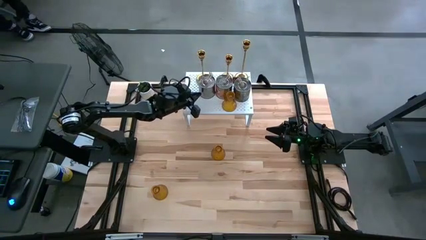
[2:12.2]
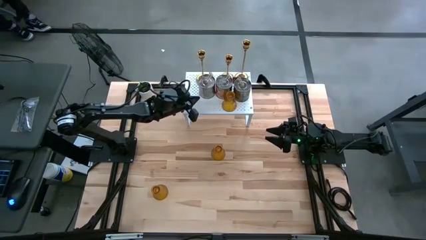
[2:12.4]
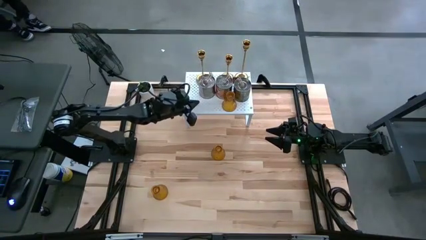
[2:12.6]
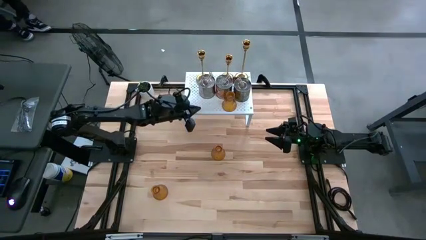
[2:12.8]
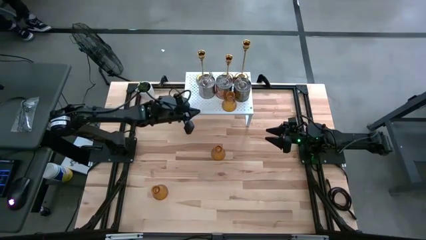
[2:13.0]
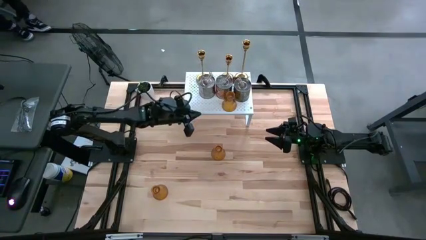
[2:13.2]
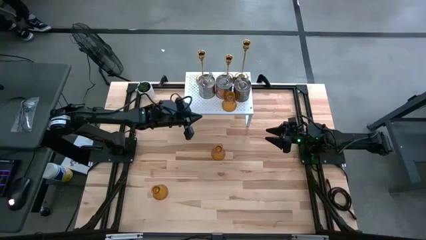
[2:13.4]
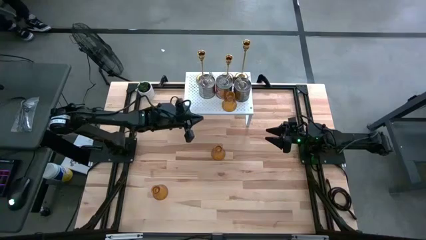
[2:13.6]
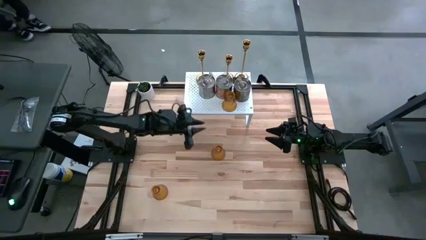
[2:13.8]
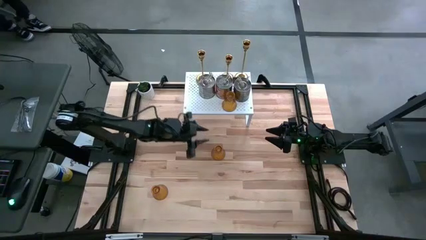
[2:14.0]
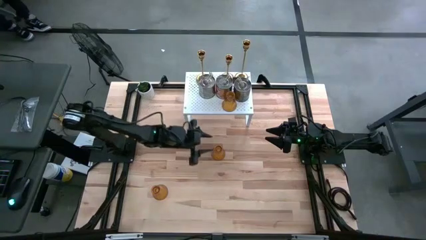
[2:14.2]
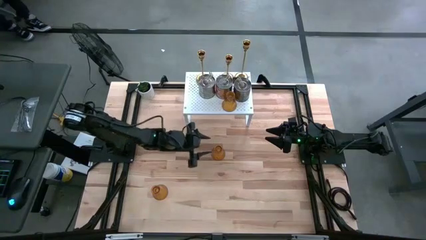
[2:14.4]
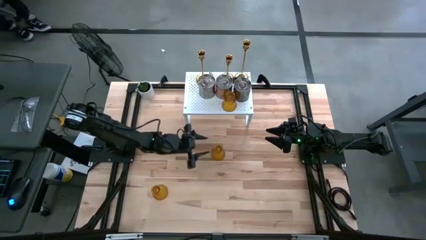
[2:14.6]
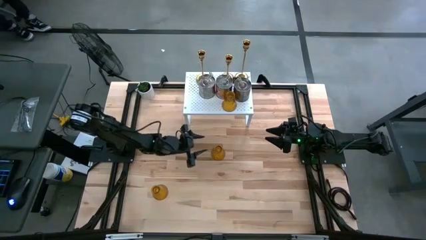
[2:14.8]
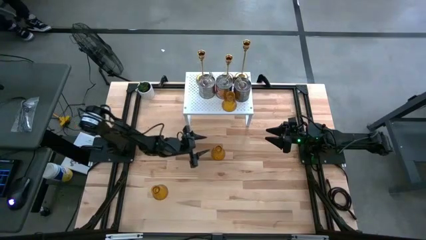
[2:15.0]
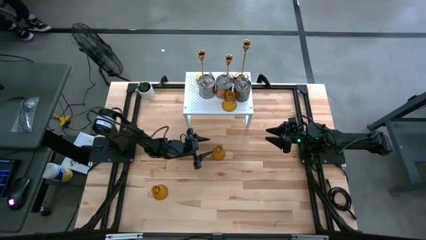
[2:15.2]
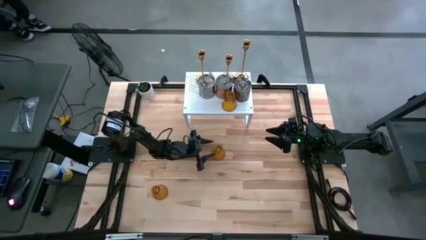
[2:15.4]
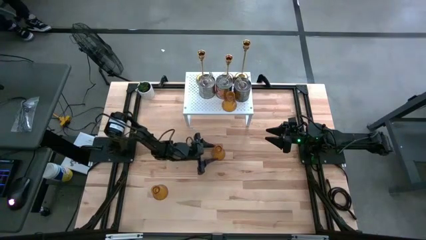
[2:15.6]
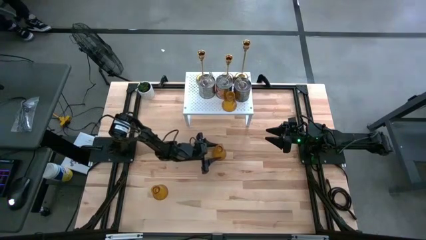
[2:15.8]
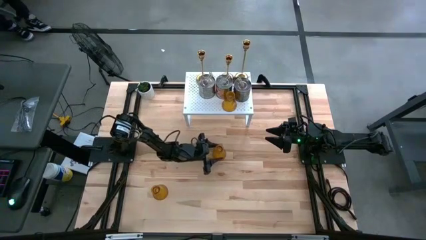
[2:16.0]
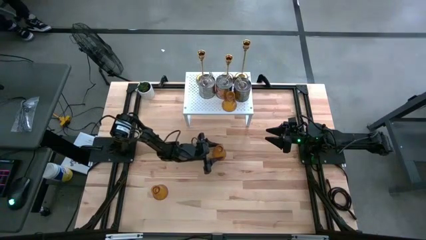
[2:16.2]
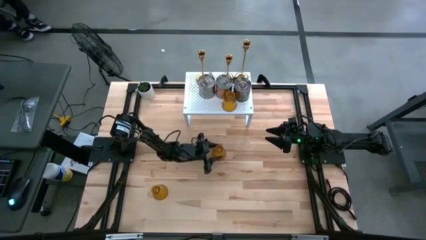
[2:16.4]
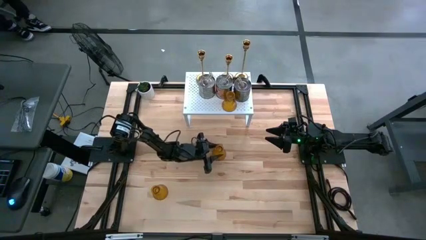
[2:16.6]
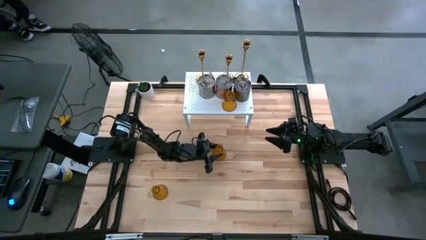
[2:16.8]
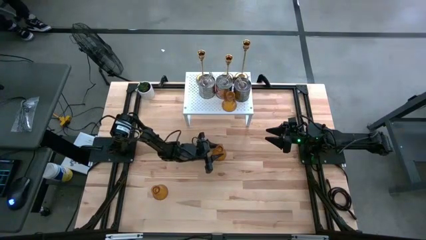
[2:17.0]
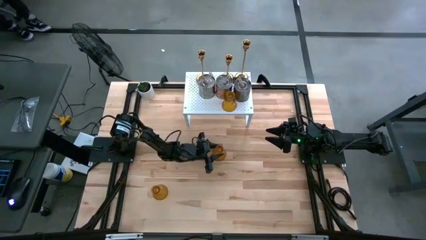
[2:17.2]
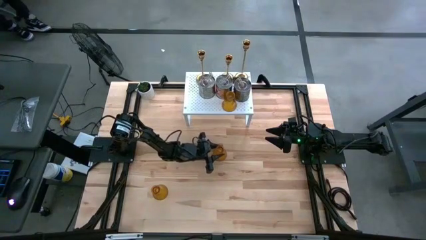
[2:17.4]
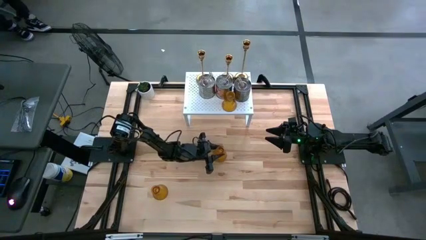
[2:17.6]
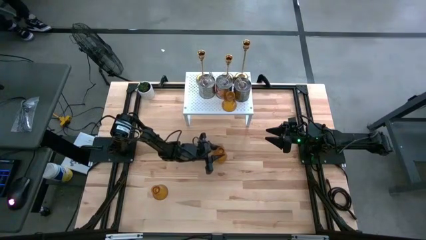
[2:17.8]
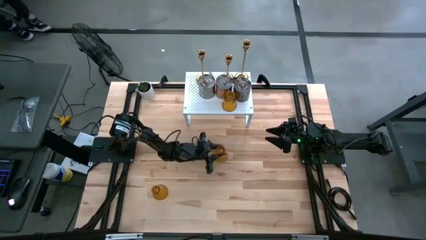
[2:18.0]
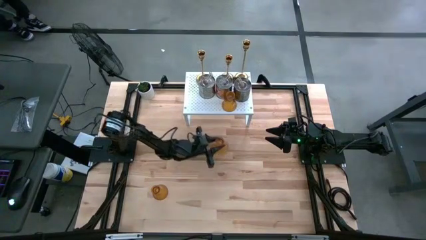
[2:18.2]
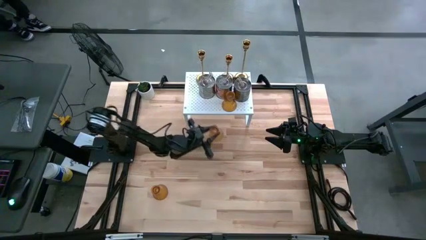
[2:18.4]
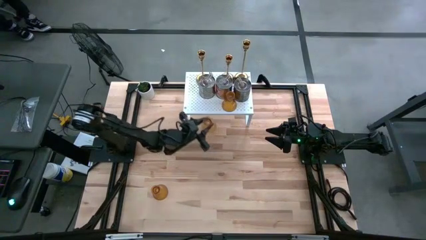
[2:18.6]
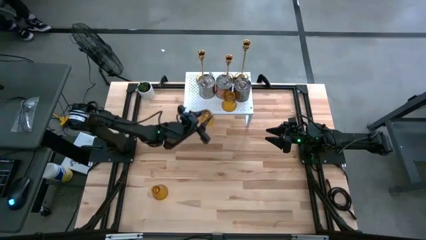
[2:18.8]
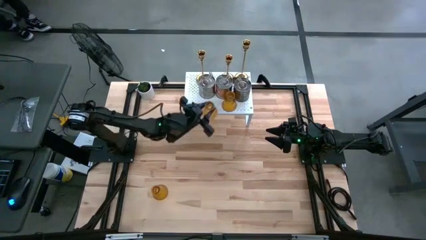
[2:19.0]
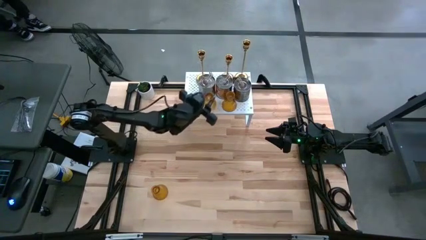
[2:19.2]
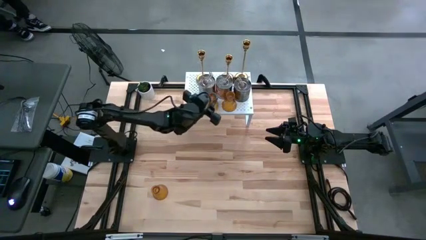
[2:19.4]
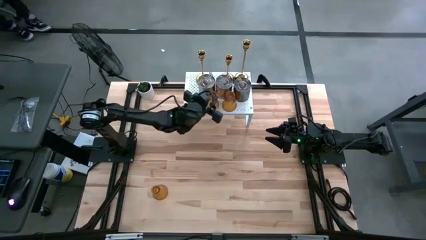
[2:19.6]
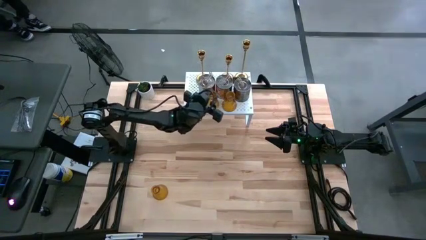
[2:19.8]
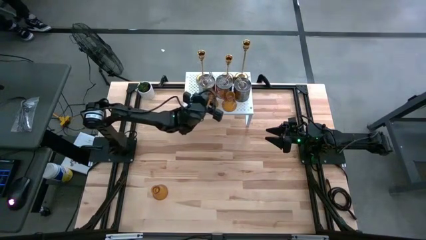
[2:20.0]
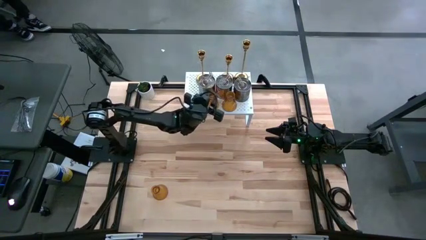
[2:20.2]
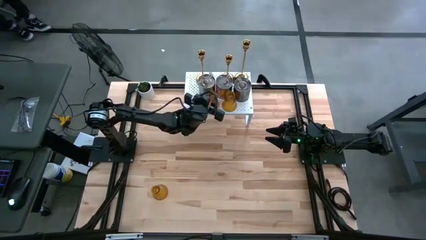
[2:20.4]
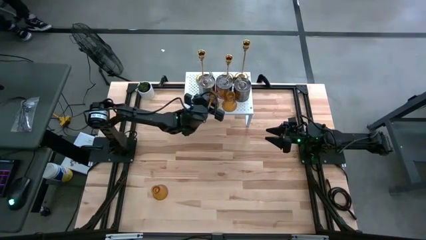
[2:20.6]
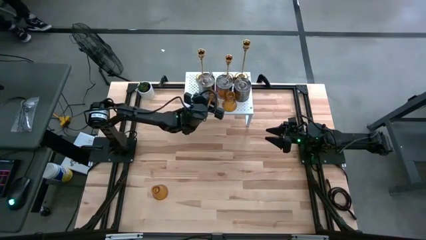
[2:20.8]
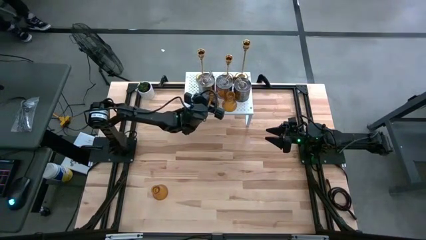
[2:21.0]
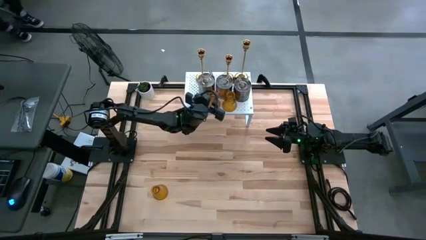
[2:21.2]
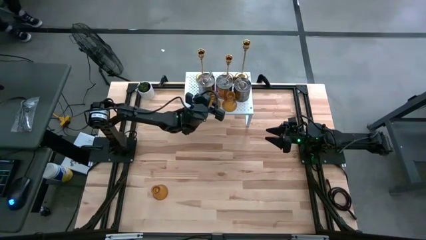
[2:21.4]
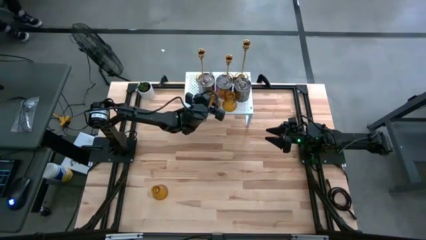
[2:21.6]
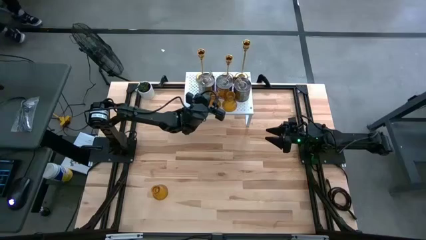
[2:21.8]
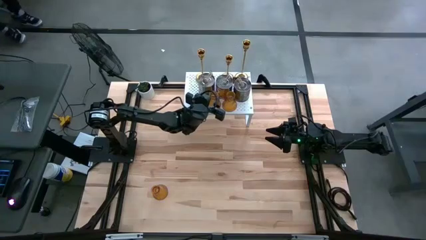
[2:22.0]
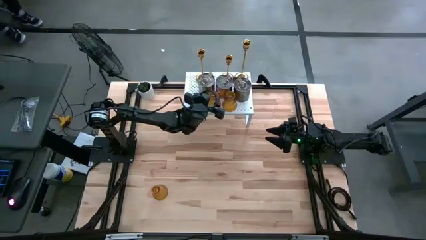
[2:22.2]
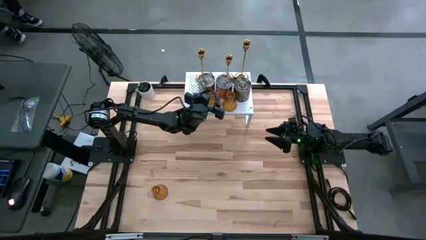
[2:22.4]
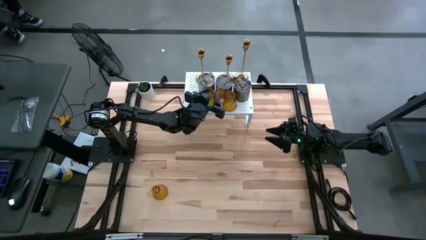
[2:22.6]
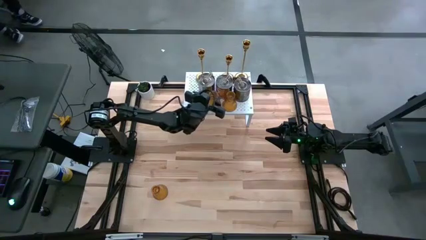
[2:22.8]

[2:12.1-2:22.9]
Task: Pick & Place candle stick holders
Put the right orange glass candle holder on the shelf

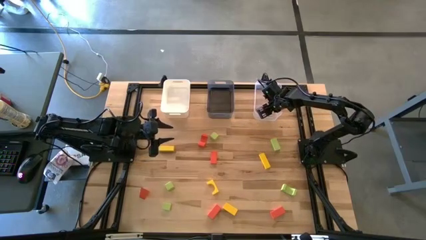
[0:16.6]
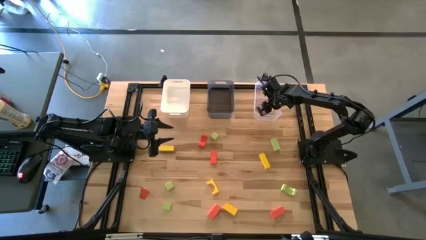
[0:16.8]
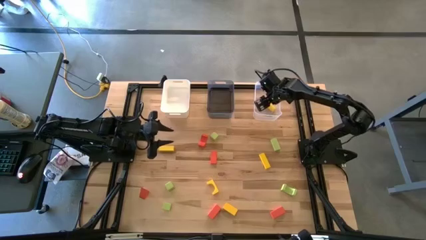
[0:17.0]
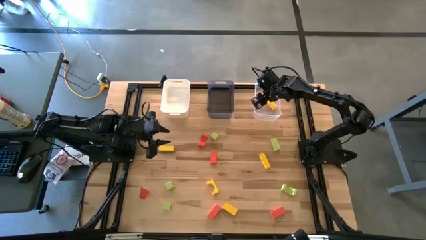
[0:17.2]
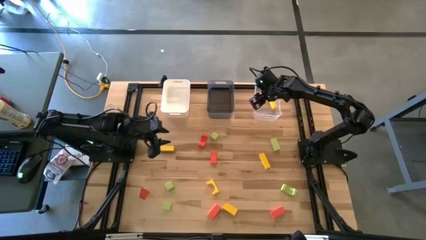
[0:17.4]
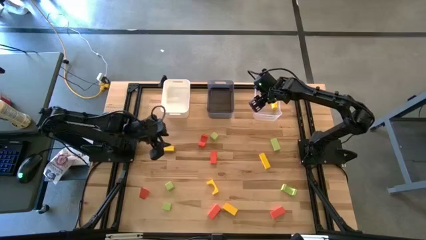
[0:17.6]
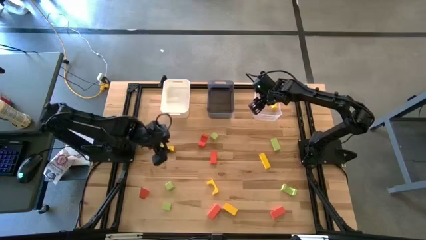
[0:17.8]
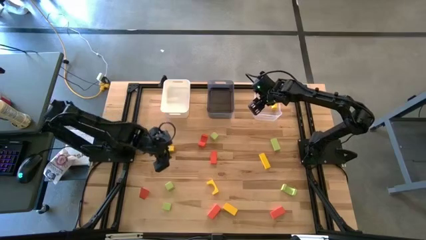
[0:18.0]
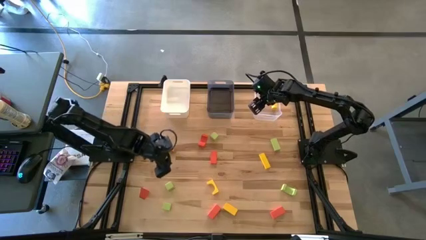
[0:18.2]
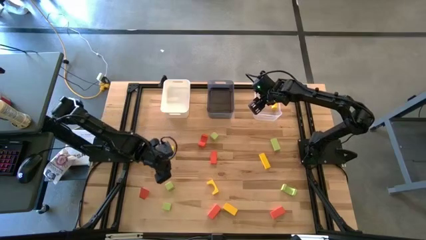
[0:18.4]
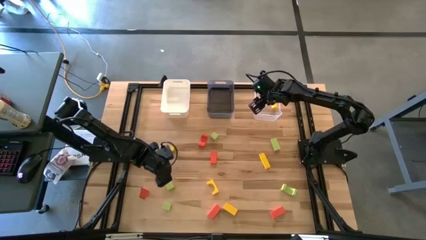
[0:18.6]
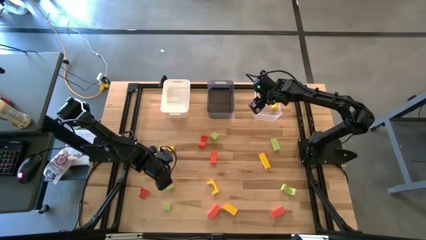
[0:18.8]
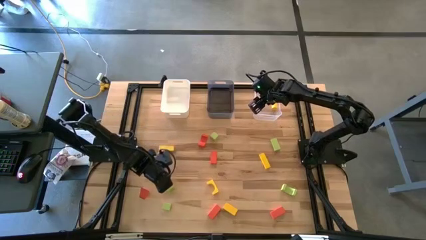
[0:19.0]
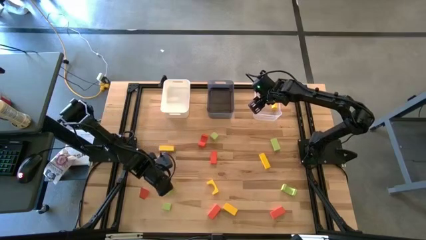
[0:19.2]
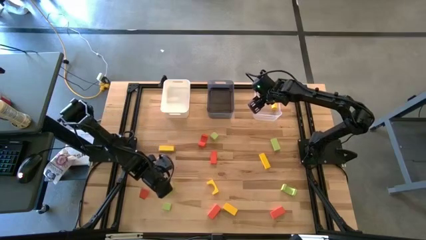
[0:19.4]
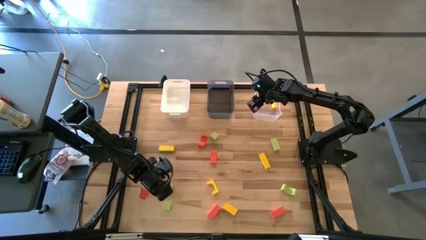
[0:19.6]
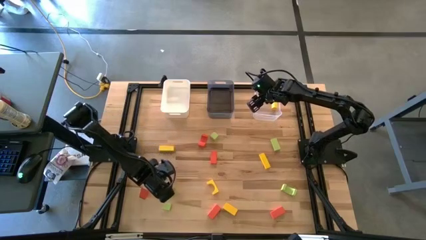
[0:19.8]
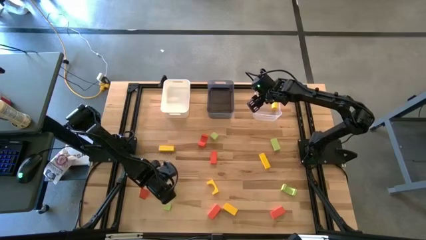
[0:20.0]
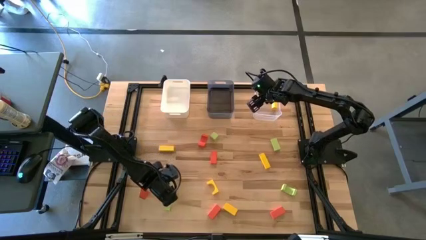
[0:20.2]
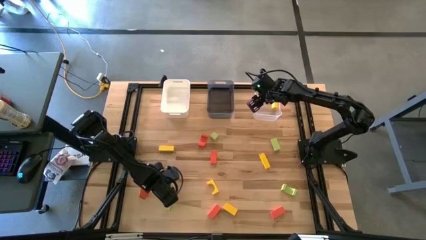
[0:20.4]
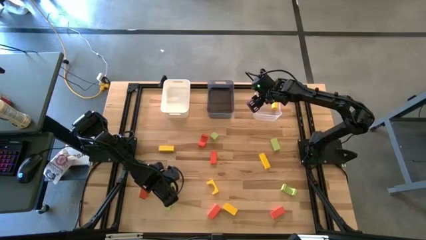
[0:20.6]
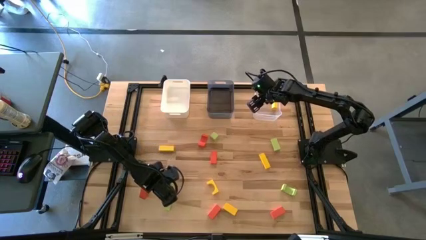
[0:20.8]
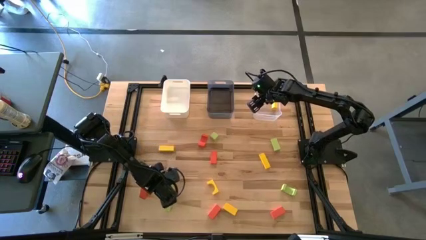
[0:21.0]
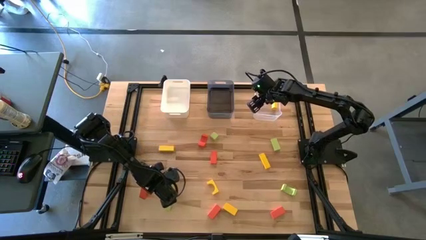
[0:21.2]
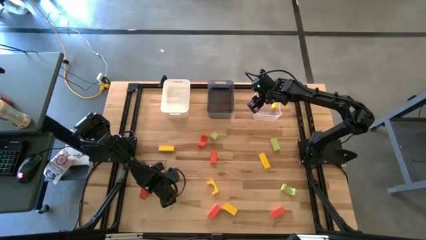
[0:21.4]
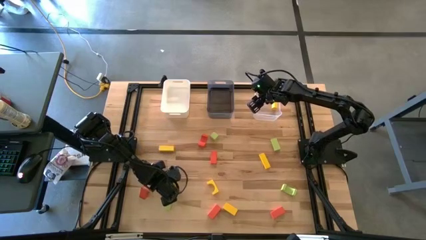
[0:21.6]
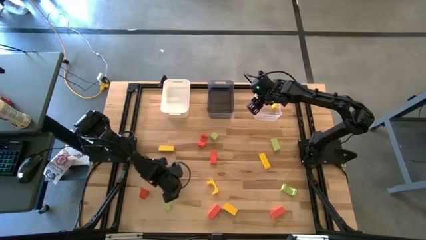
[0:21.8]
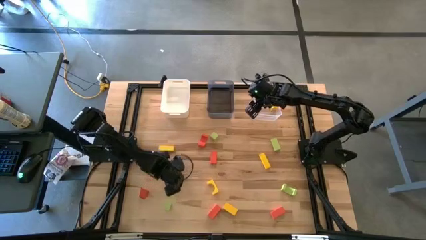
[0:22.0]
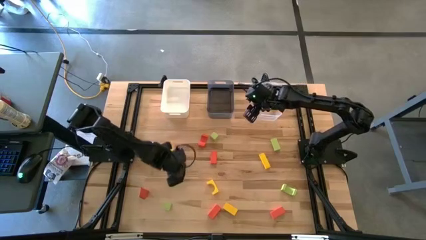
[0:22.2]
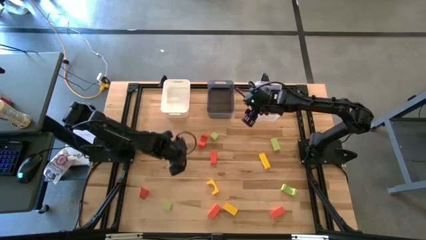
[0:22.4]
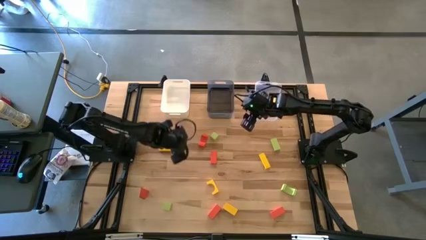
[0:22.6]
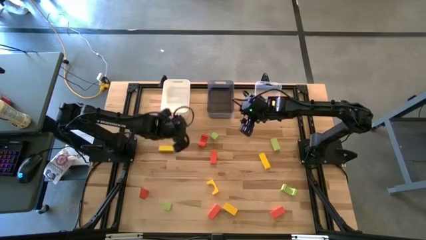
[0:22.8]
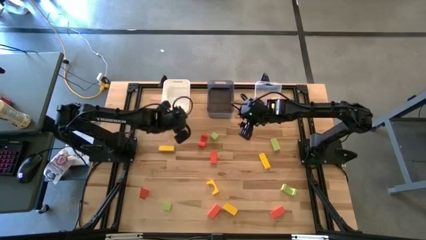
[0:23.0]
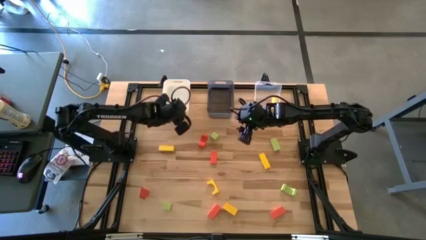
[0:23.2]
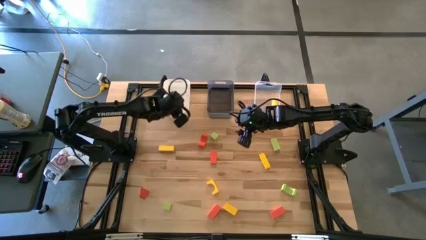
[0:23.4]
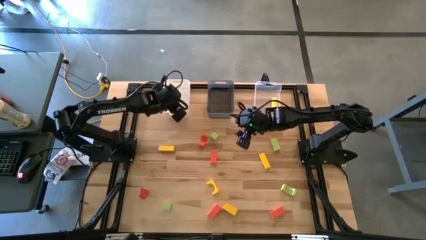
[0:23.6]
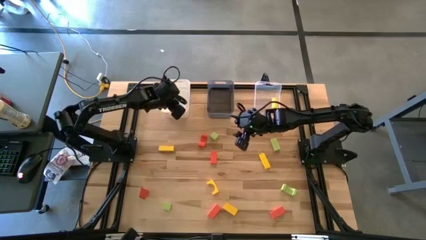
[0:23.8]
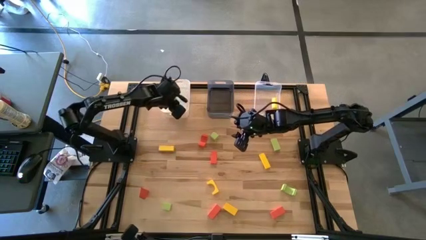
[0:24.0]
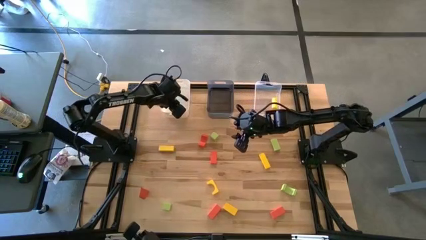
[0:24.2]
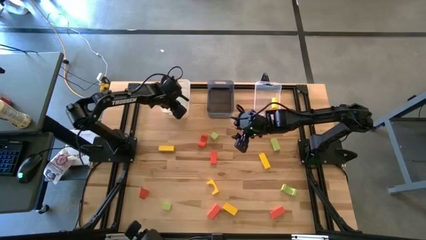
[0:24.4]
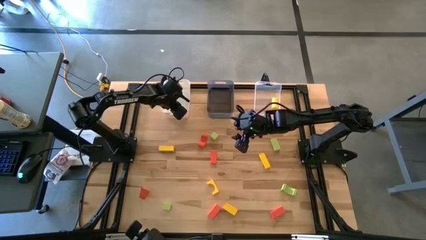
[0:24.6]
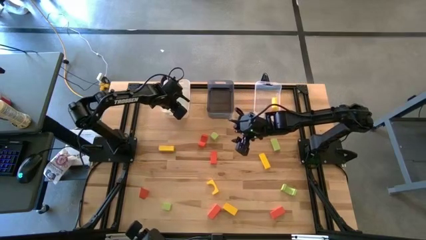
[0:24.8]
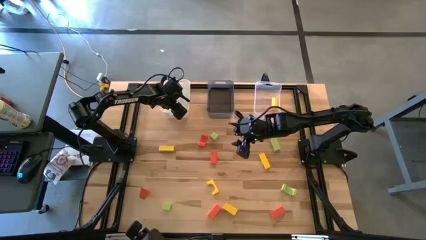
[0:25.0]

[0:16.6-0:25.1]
Task: Sort & place blocks by color
Put the green block into the white bin
